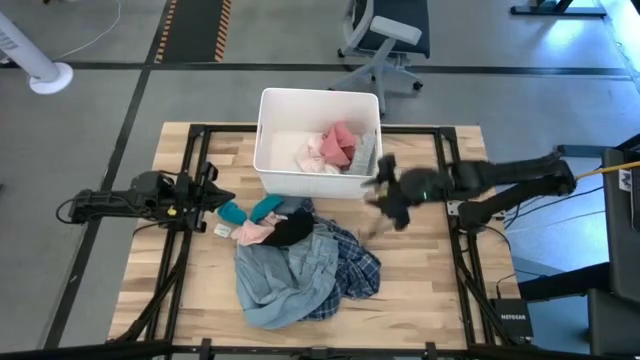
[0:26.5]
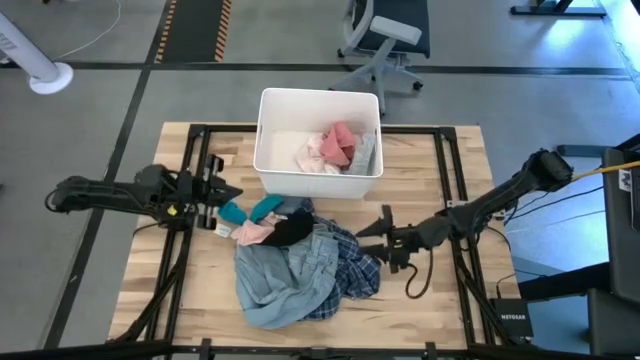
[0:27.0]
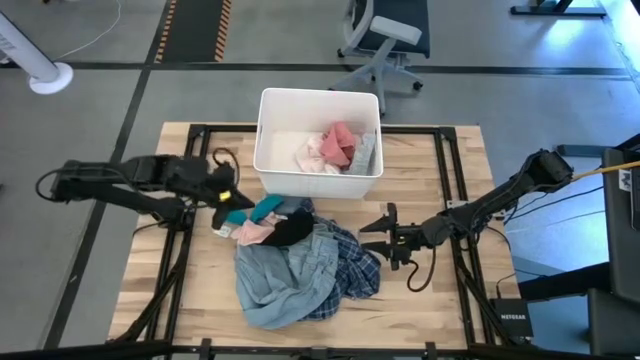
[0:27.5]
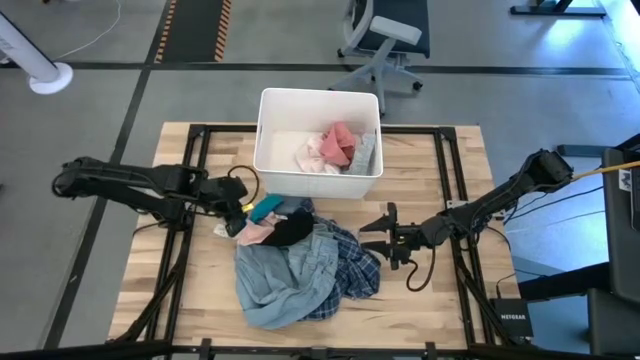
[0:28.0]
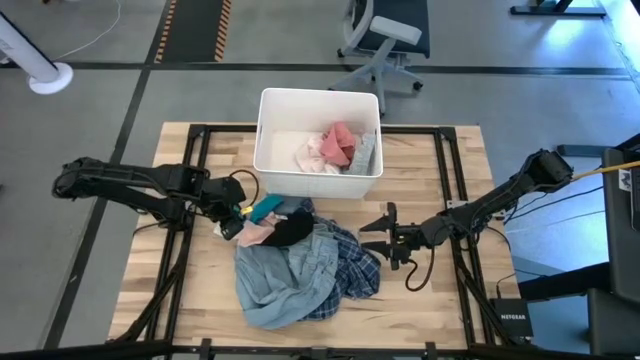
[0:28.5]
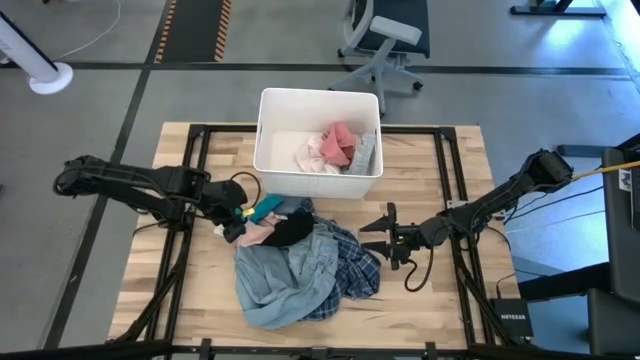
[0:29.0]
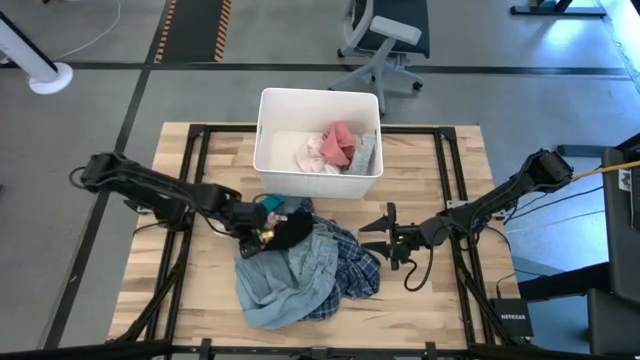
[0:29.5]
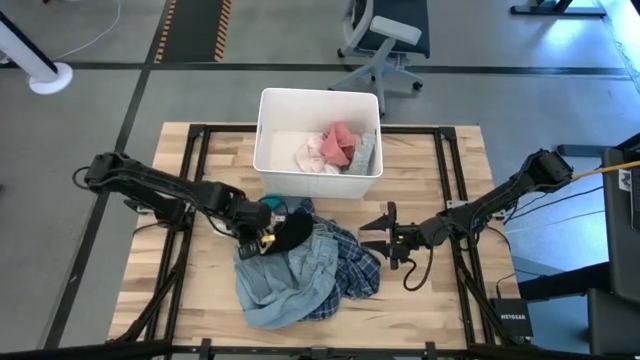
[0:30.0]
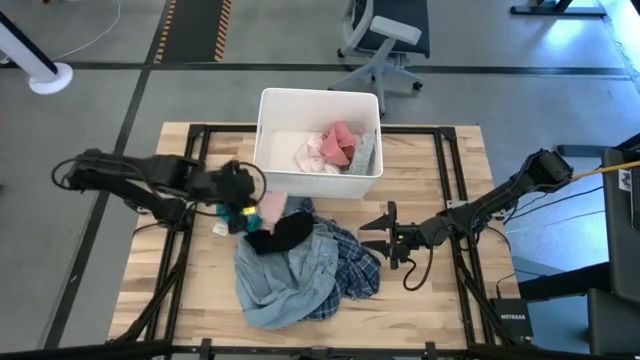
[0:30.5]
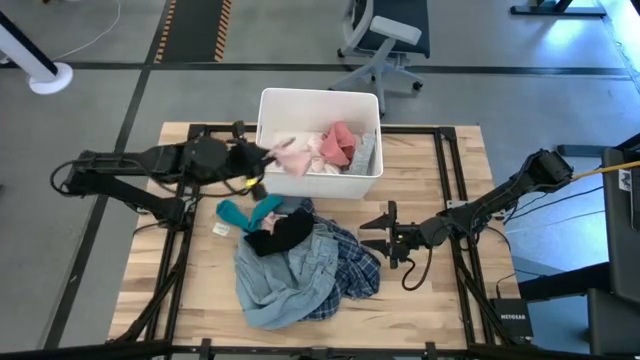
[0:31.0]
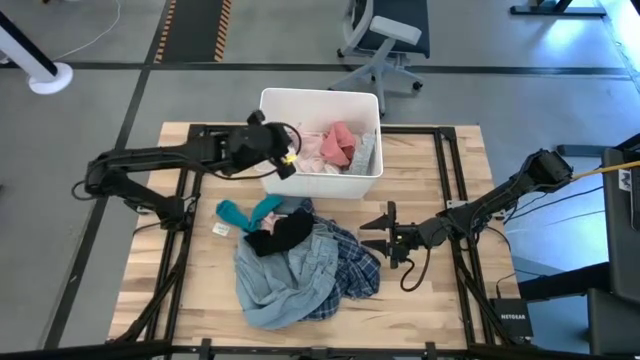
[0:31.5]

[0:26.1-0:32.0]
Task: Sort clothes
Put the light pink sock into the white laundry bin

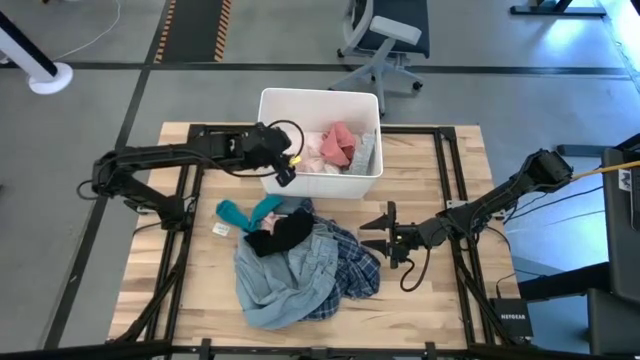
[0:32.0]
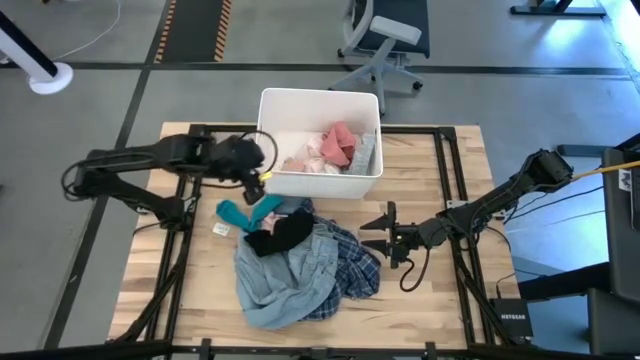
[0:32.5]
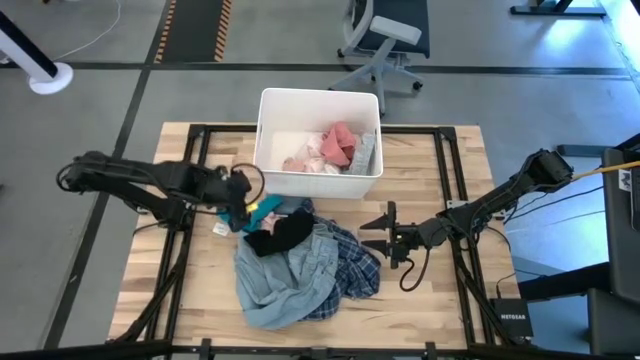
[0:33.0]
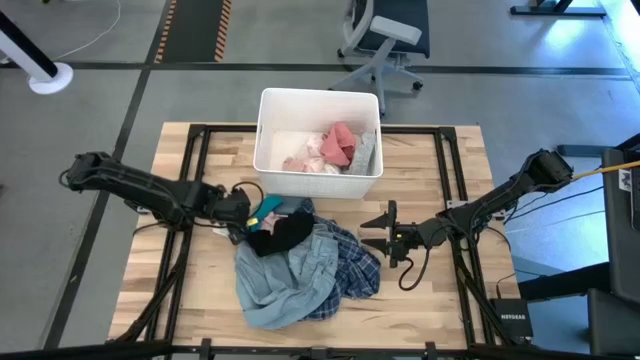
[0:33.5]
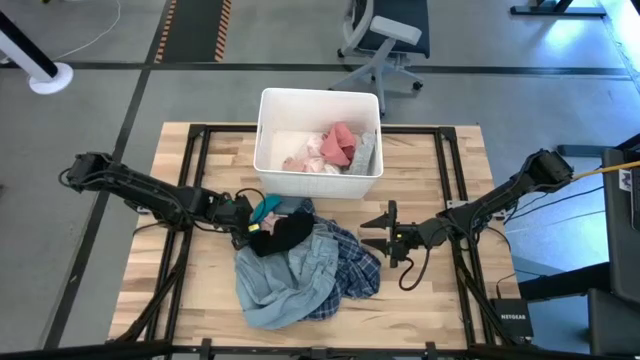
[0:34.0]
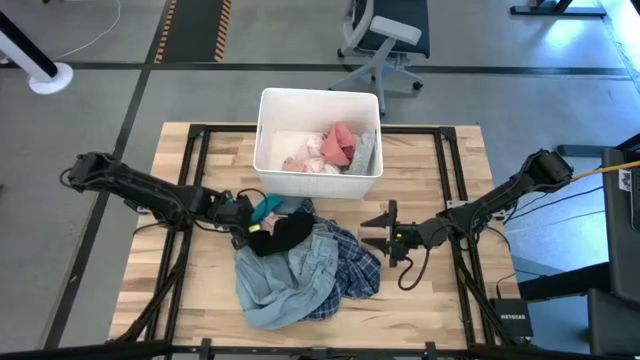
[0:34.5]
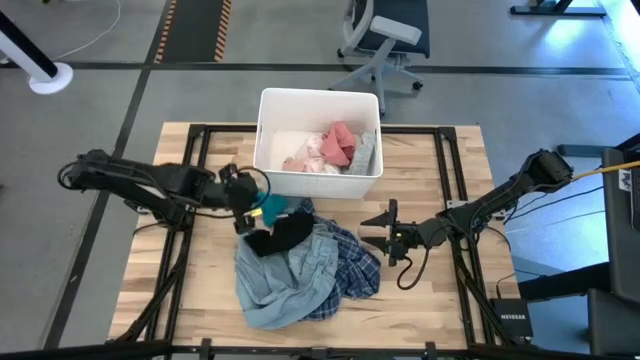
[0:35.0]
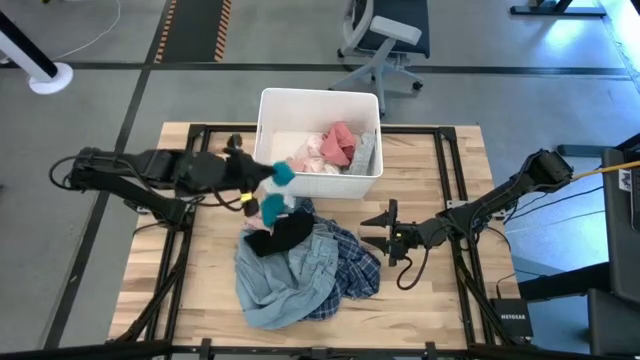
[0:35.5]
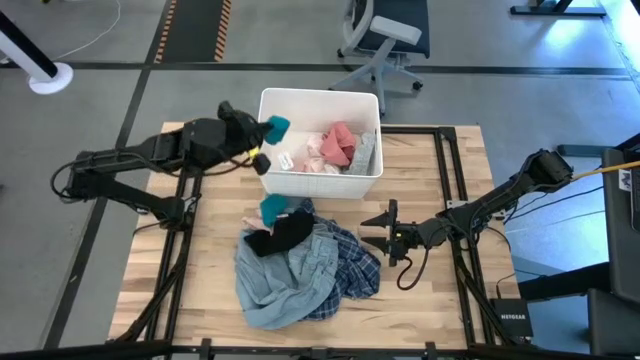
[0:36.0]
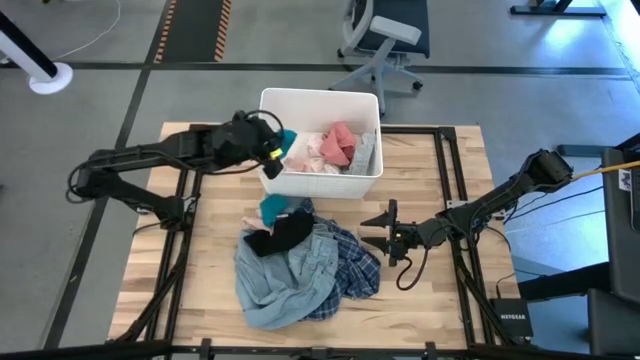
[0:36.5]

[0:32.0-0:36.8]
Put the blue sock into the white laundry bin

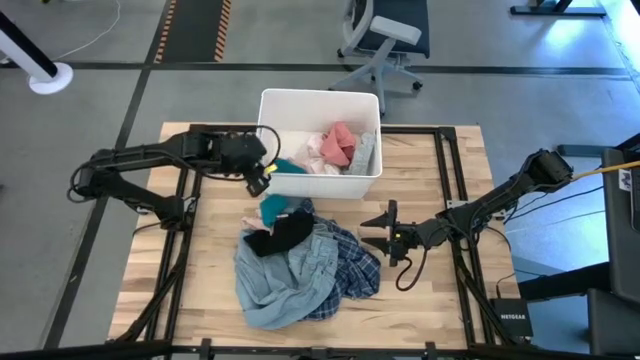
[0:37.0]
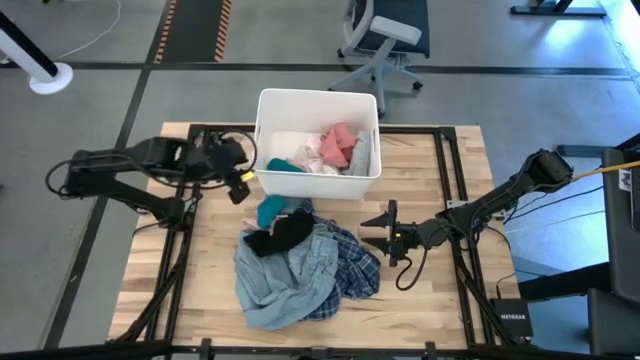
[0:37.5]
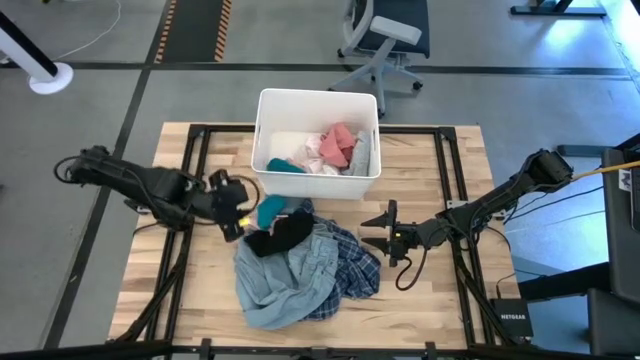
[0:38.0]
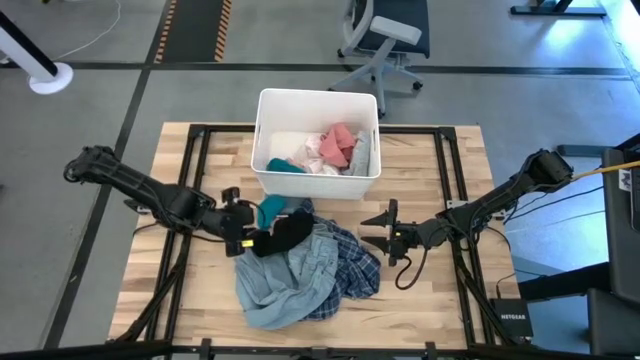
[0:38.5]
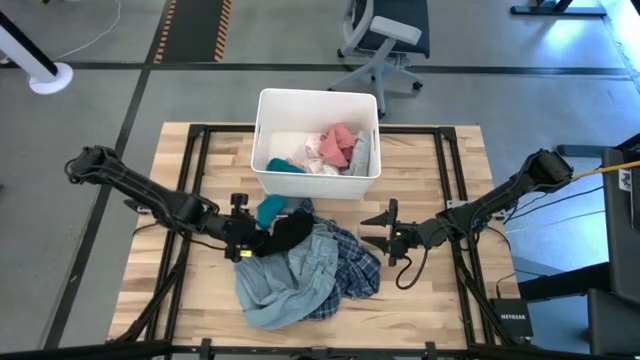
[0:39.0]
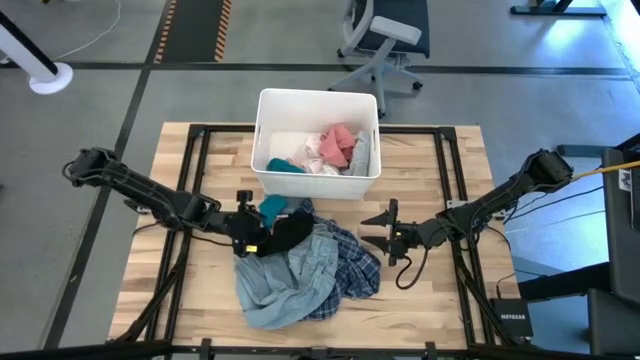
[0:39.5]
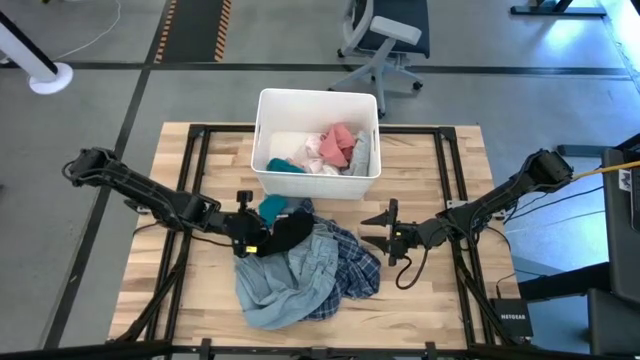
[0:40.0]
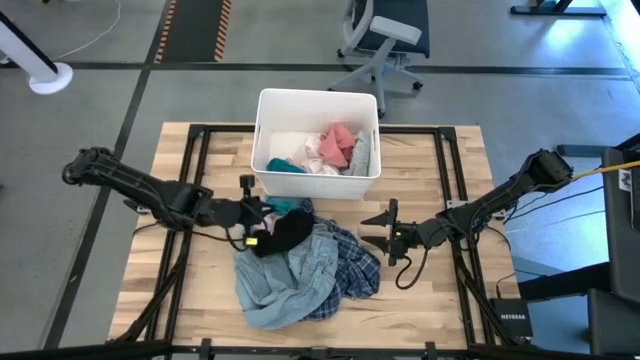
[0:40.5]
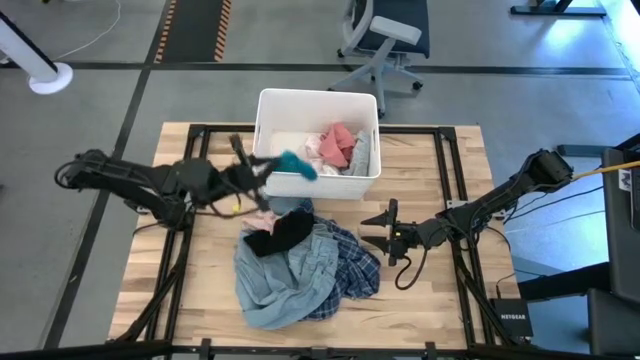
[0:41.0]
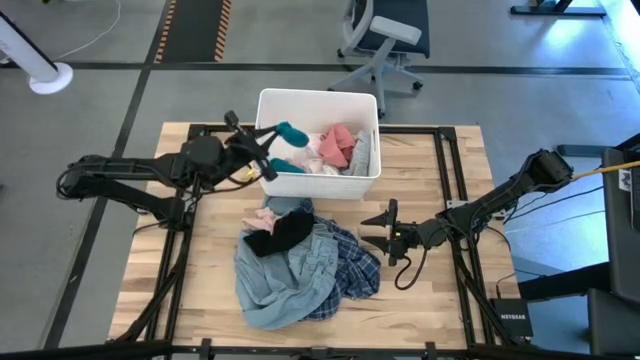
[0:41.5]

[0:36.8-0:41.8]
Put the blue sock into the white laundry bin

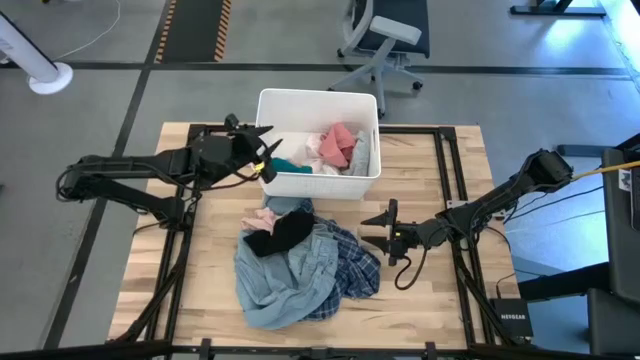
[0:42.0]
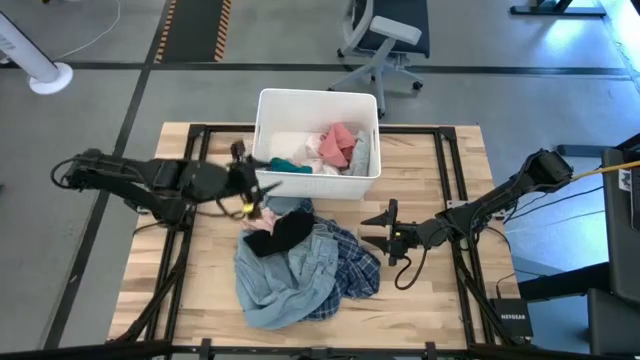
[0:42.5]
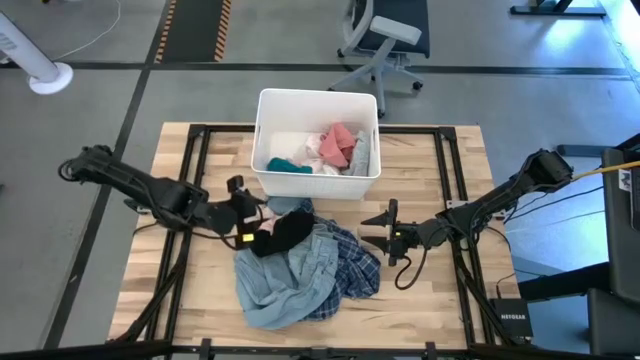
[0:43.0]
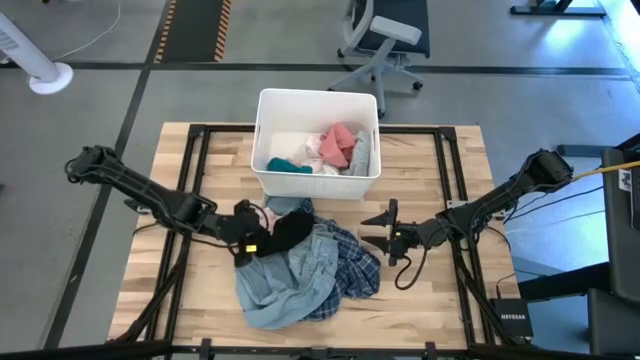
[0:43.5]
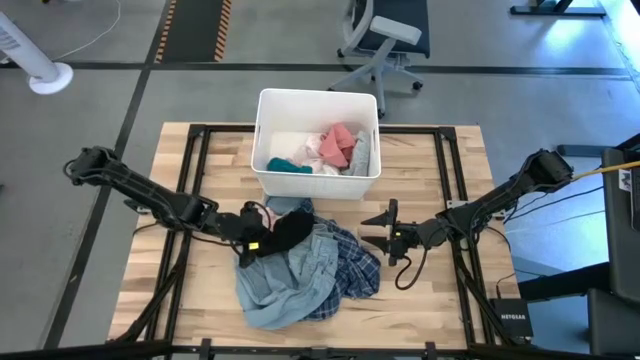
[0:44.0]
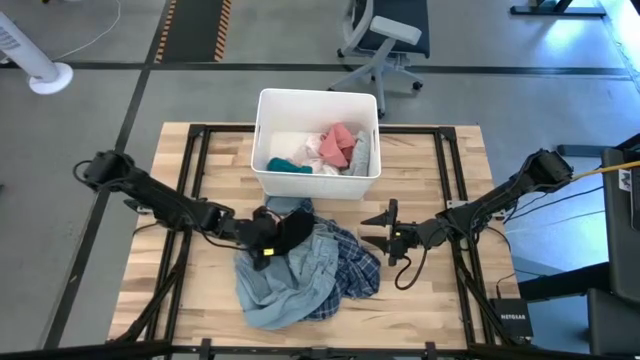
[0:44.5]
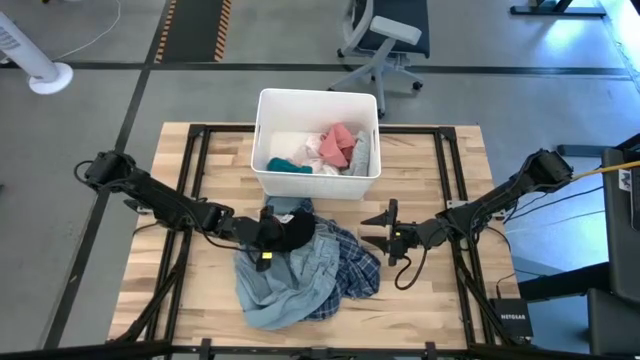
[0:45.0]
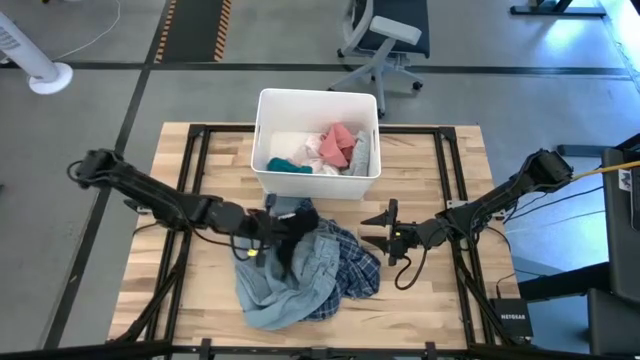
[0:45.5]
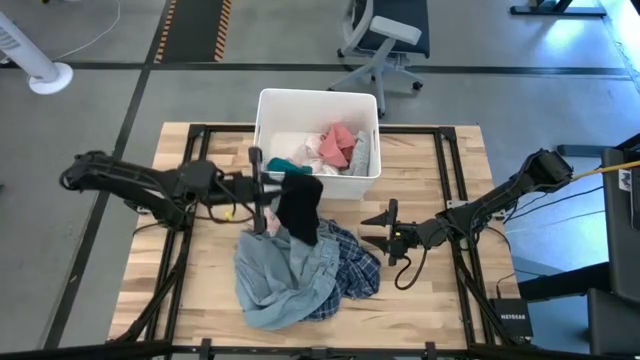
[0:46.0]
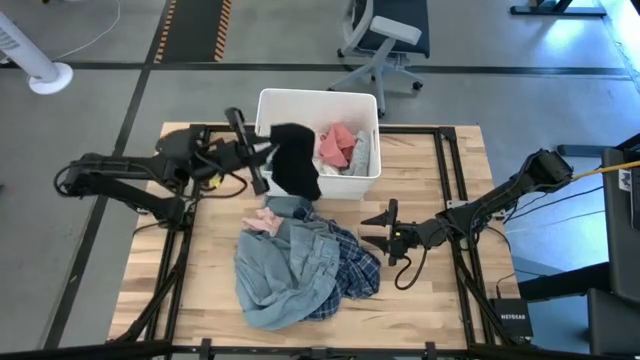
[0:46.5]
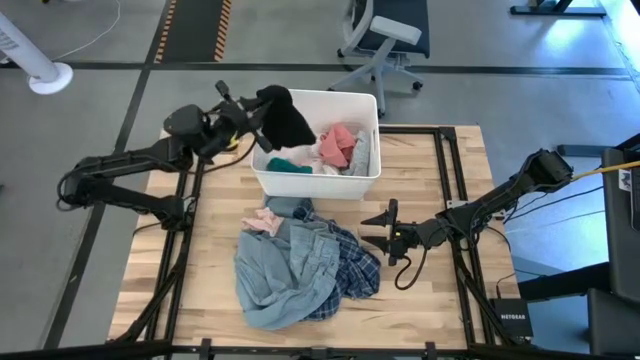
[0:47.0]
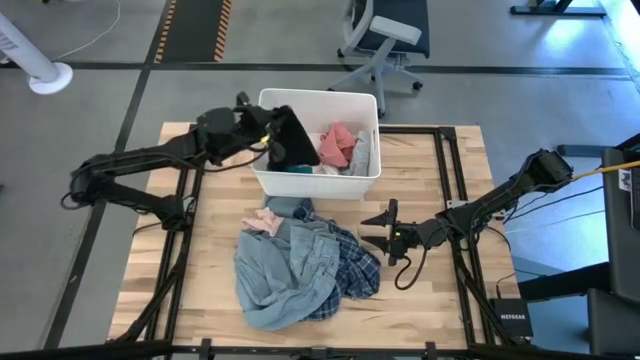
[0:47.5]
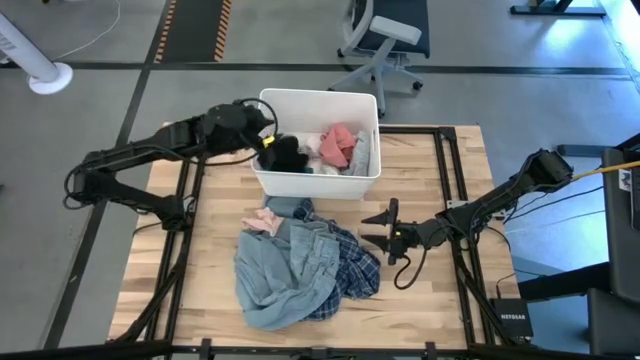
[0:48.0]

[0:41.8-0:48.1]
Put the black boxer shorts into the white laundry bin
